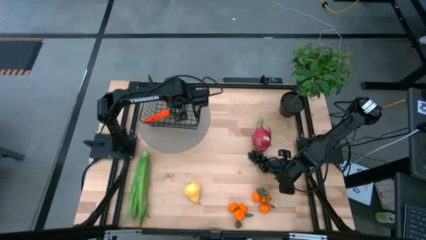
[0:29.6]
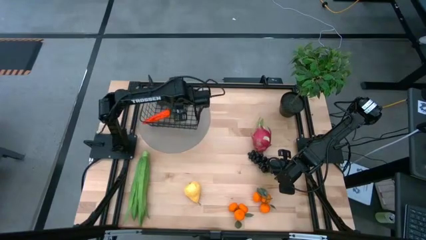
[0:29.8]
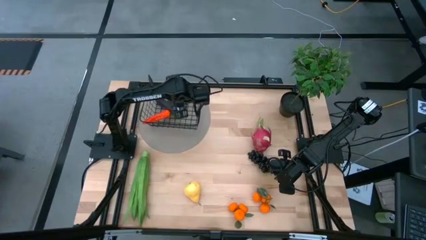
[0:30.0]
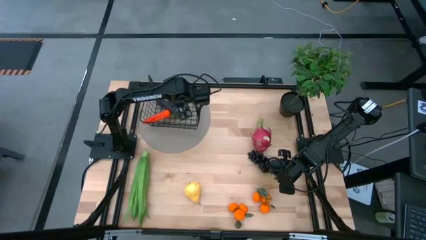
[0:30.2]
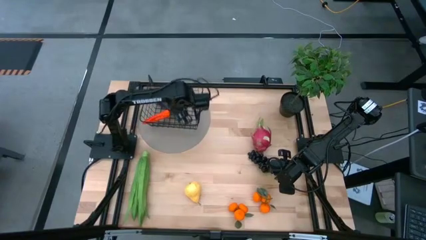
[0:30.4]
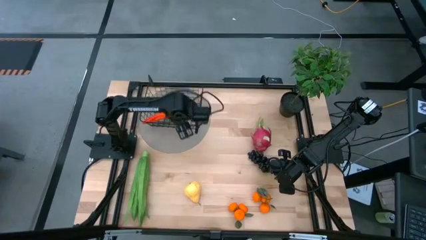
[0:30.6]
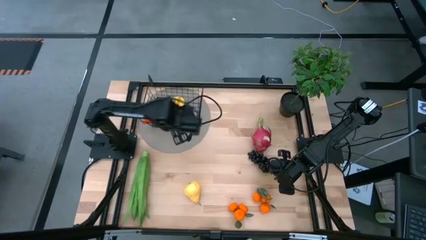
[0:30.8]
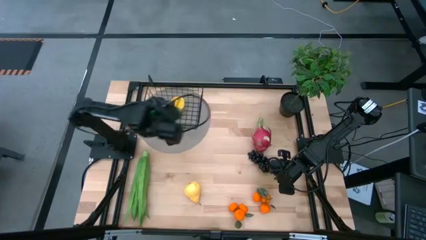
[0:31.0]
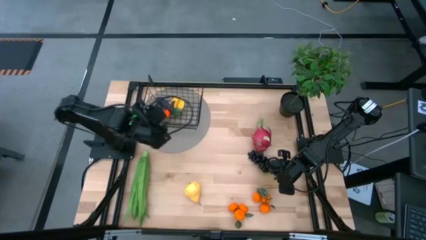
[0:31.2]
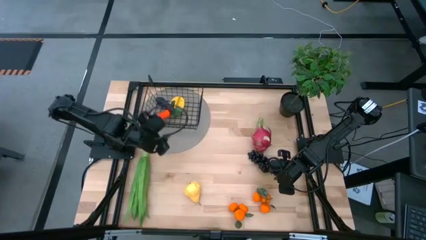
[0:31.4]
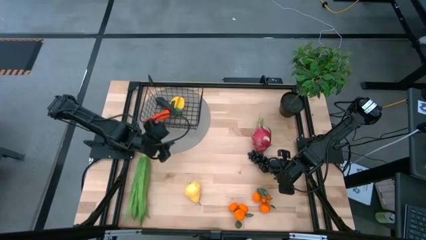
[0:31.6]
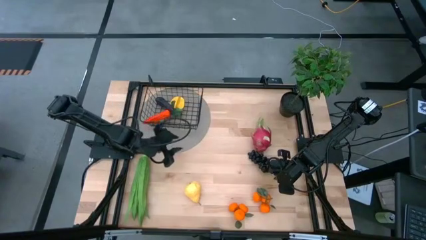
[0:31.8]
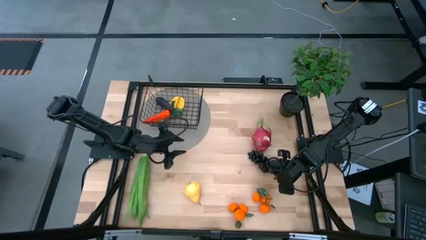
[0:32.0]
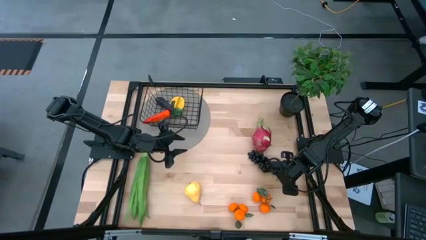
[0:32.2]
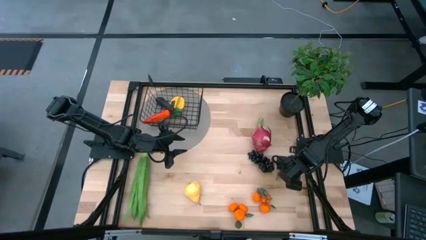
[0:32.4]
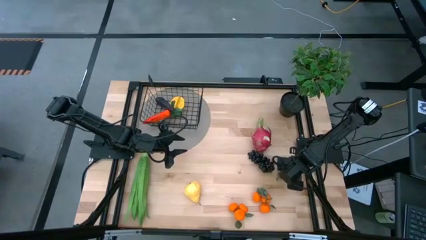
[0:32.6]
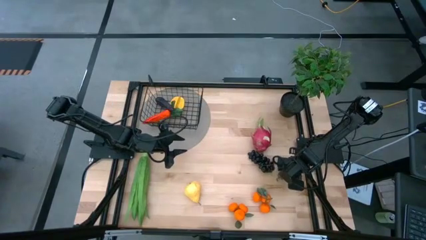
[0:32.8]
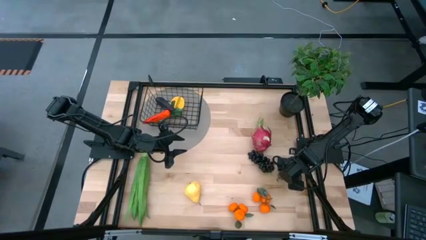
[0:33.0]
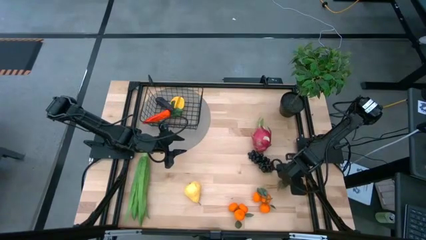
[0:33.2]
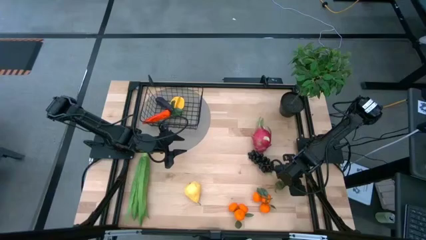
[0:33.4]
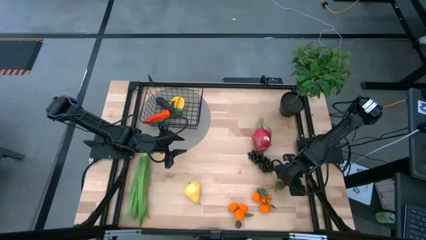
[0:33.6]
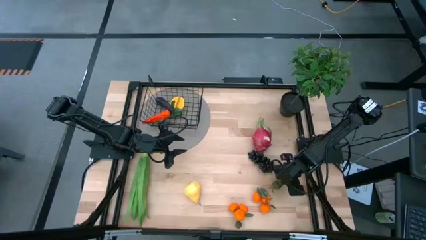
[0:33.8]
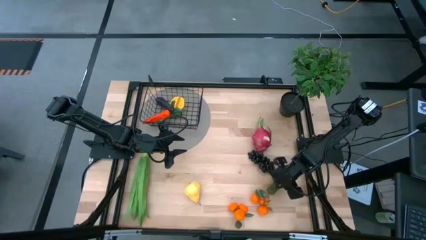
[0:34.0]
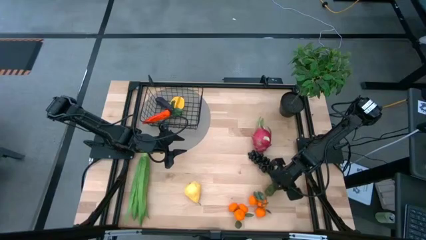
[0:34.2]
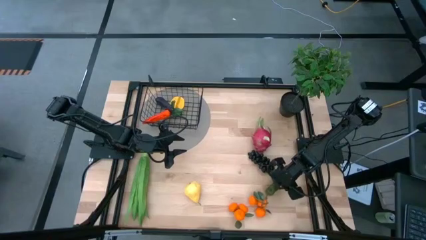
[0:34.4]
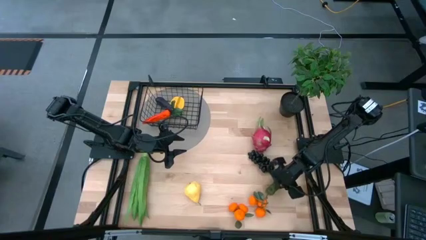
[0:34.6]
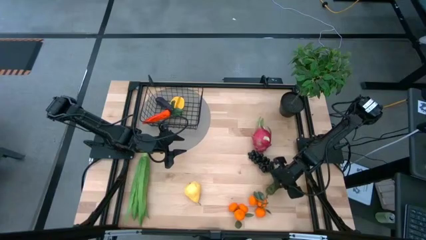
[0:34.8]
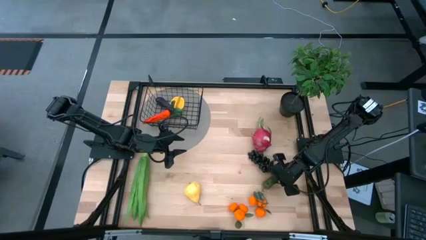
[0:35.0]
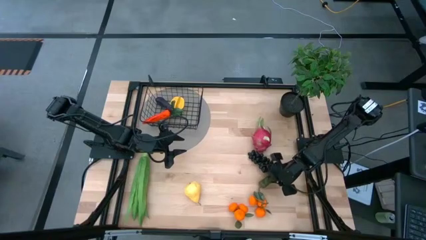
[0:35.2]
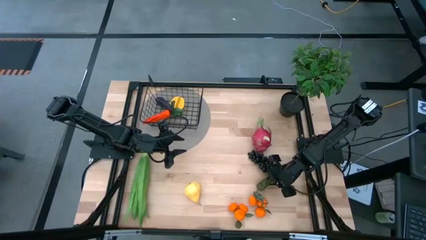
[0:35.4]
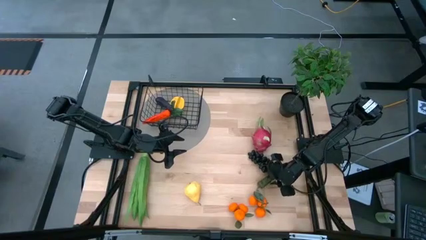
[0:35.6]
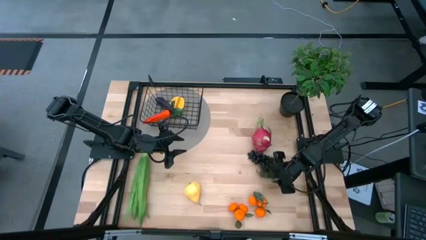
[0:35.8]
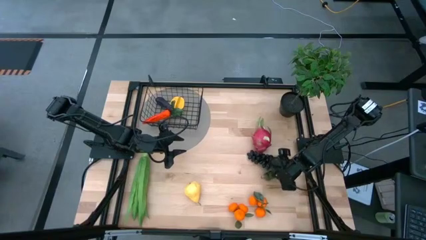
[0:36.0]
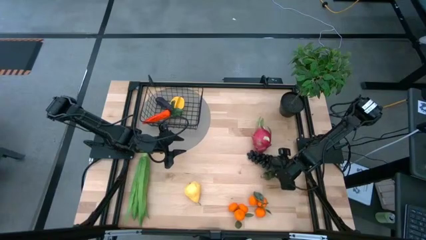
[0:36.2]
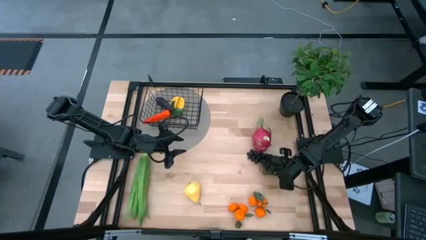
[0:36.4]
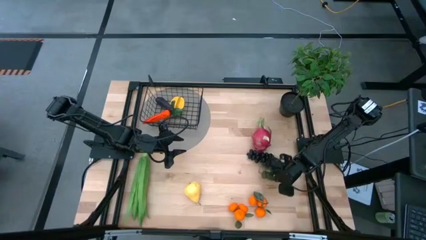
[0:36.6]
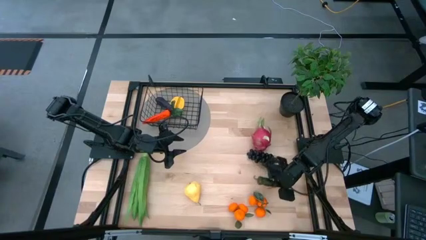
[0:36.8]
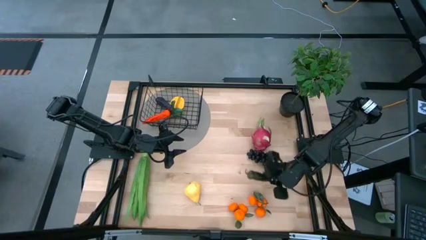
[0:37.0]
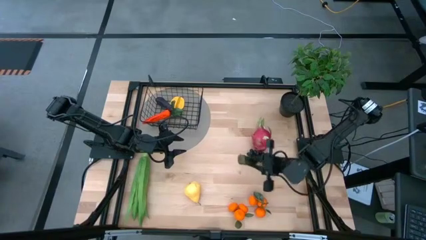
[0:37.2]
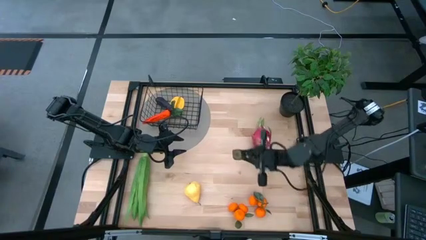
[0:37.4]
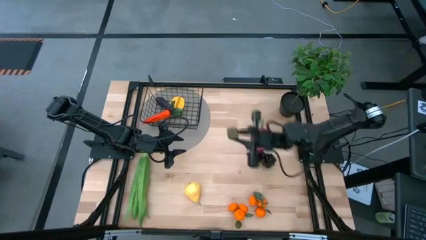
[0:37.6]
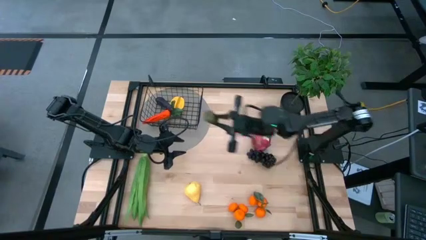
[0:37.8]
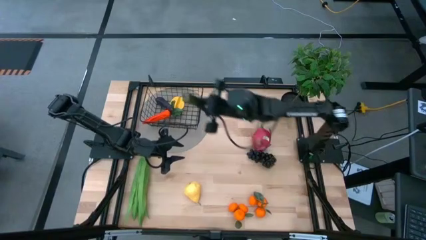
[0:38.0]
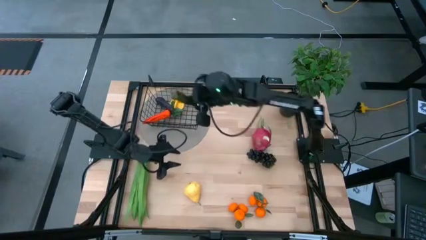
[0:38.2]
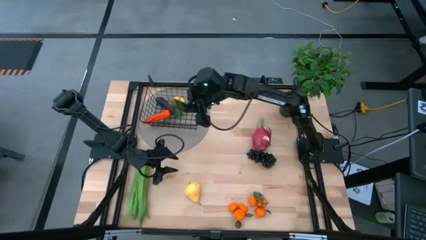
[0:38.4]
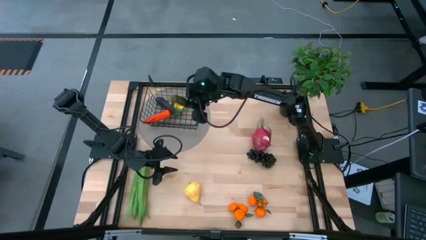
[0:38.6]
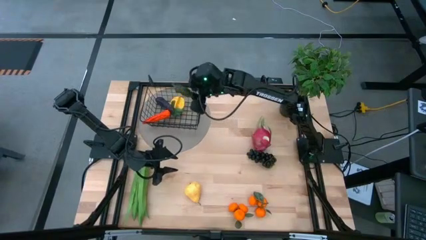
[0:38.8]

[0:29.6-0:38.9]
Task: Build produce basket
Put the green chili pepper into the black wire basket

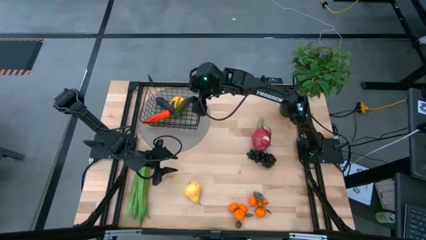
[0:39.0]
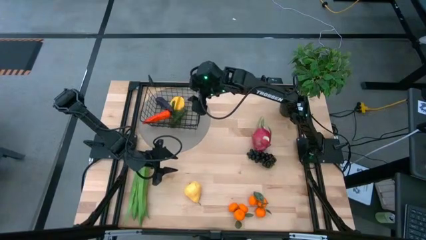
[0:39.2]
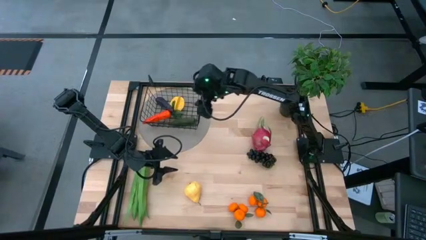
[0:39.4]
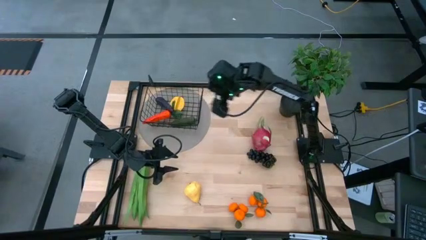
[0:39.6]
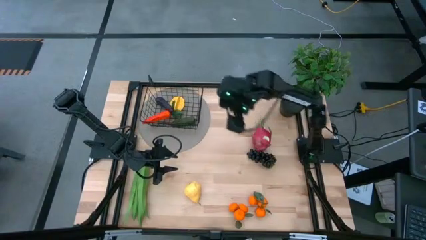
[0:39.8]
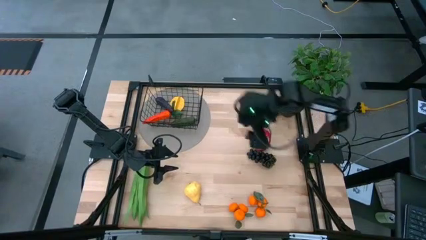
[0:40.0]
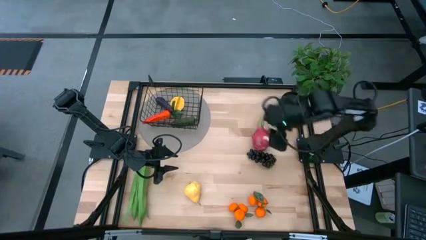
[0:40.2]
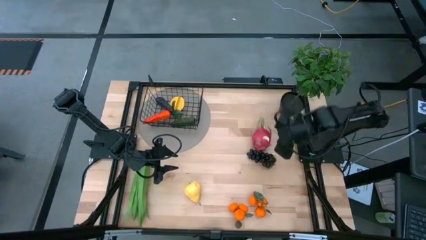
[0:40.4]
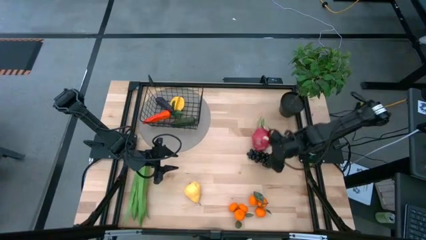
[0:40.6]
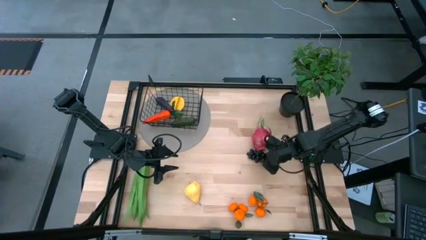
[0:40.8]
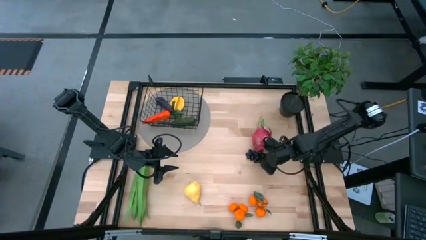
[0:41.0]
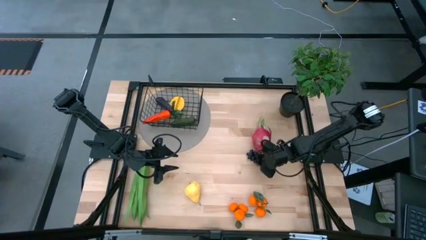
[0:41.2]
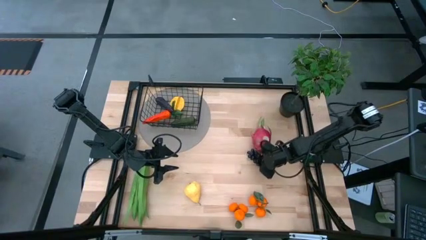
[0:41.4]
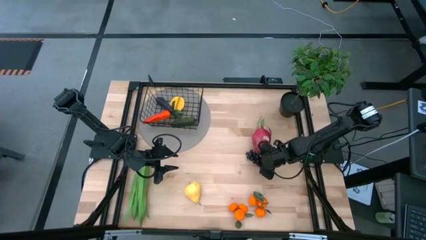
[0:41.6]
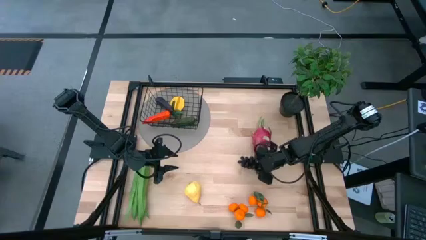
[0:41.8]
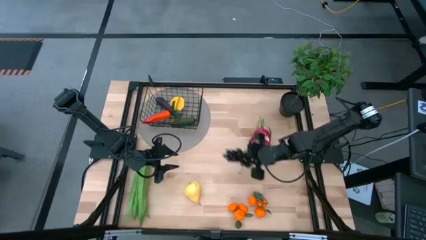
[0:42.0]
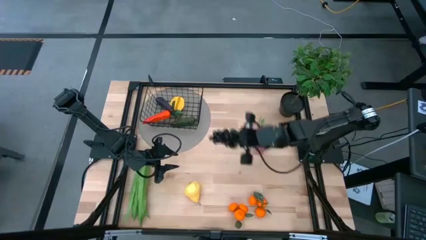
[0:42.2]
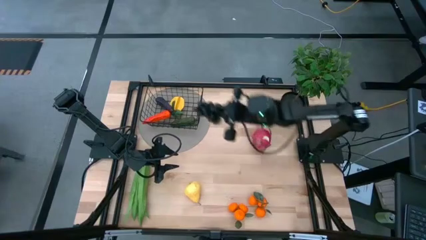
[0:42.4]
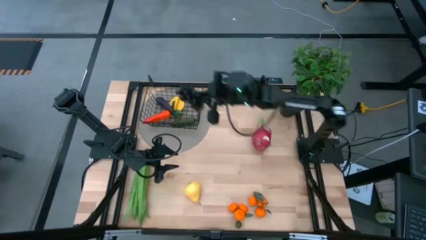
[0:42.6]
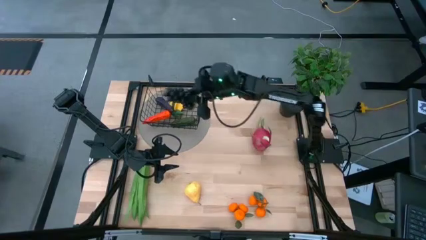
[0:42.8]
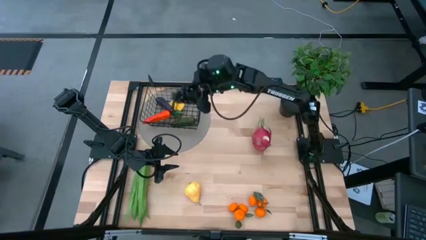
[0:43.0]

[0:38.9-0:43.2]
Put the purple grapes into the black wire basket

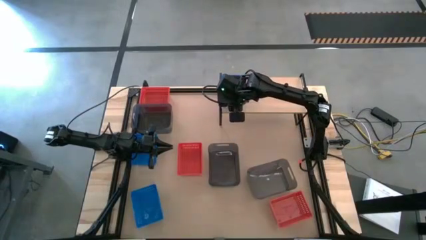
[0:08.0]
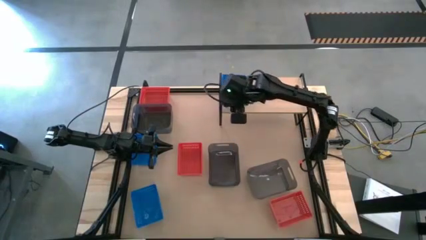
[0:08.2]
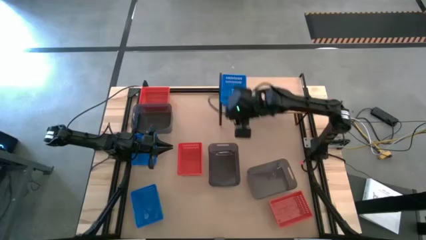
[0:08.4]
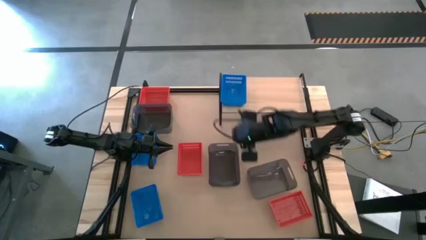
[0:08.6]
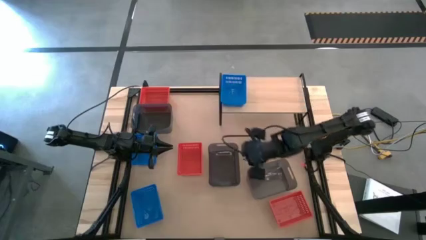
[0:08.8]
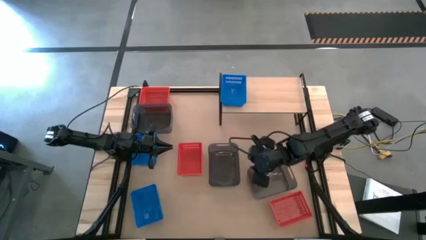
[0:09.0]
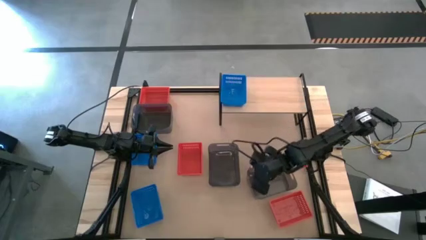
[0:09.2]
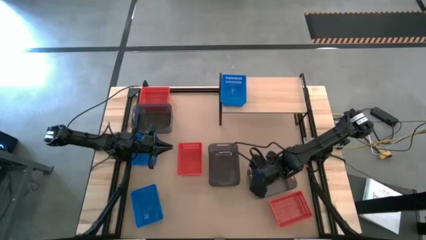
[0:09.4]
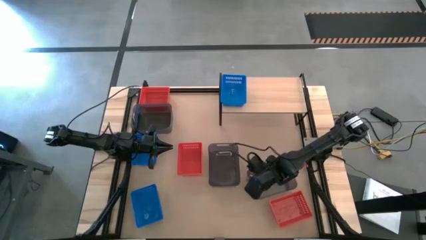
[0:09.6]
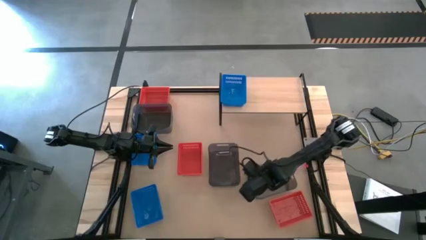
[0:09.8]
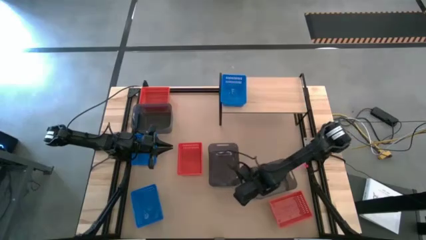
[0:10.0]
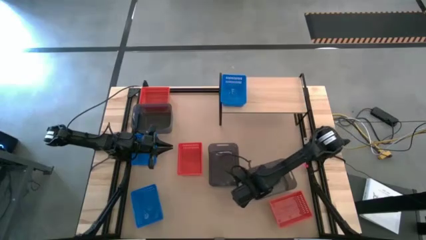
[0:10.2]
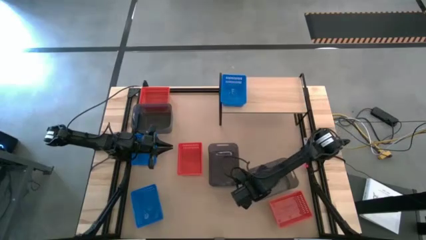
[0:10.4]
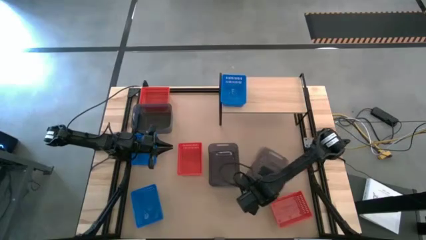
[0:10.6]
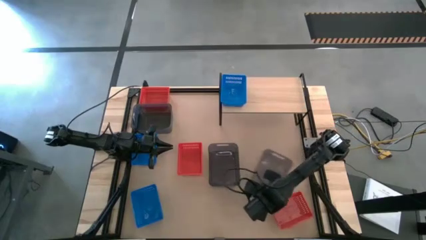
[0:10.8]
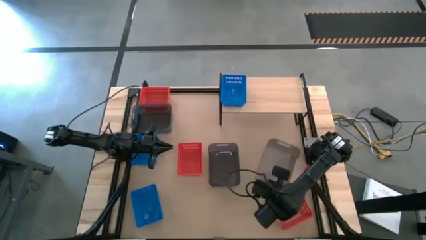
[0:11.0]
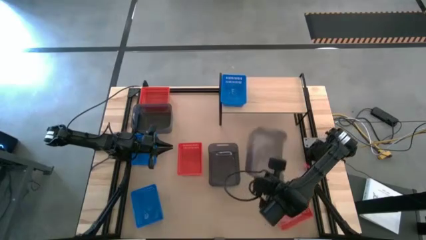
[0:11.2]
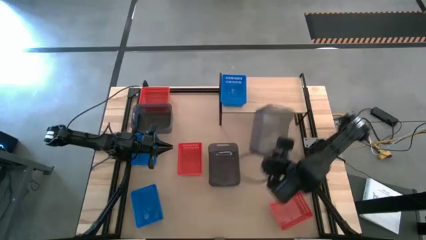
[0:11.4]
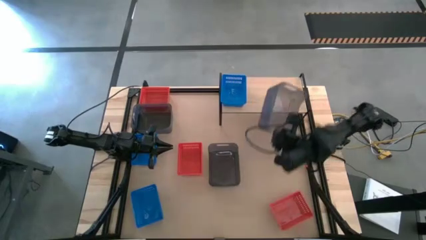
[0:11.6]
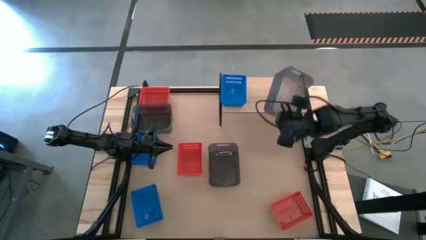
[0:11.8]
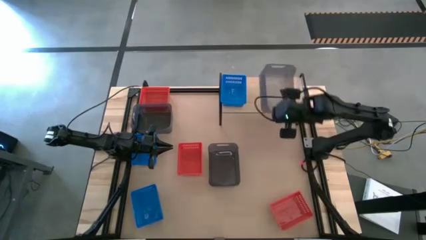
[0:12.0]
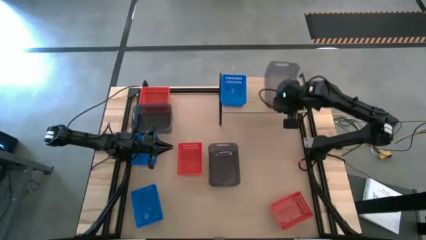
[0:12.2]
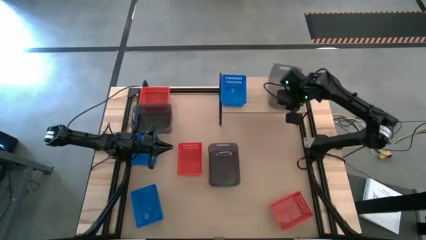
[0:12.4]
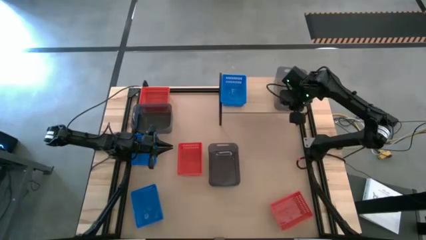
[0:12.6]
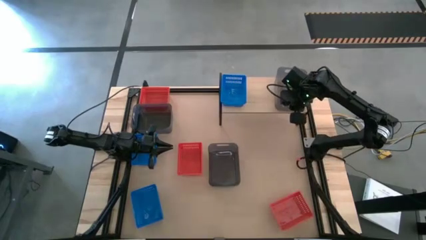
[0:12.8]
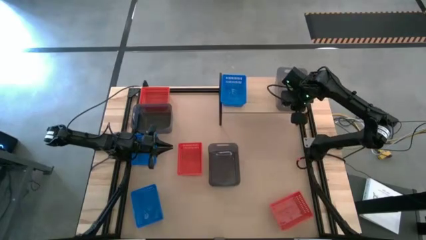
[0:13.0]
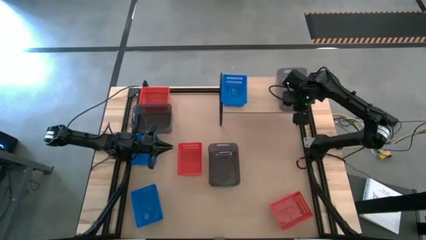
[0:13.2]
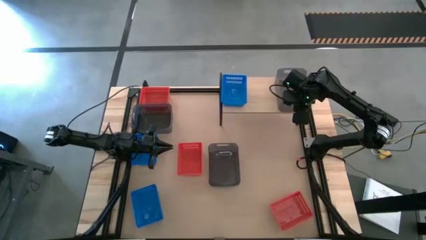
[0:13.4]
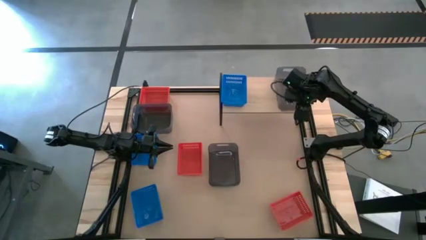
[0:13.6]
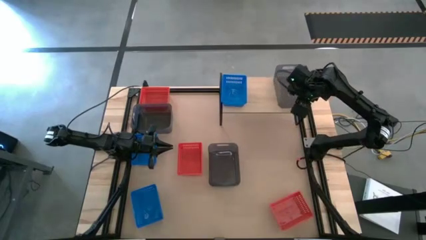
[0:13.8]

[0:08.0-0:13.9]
Task: Stack baskets on shelf by color
Put the right black bin on the shelf
